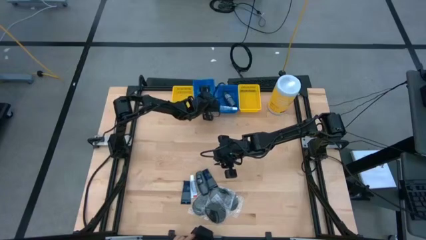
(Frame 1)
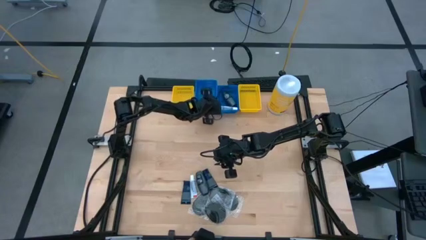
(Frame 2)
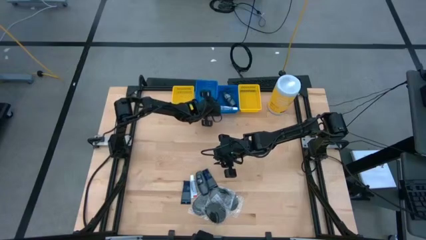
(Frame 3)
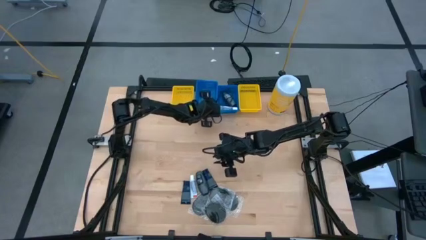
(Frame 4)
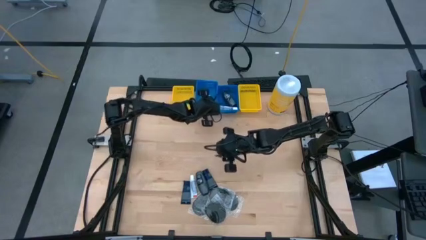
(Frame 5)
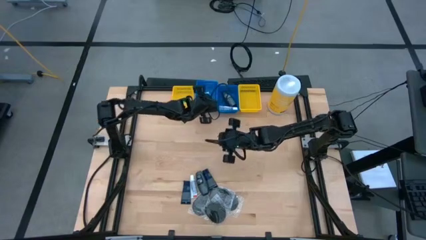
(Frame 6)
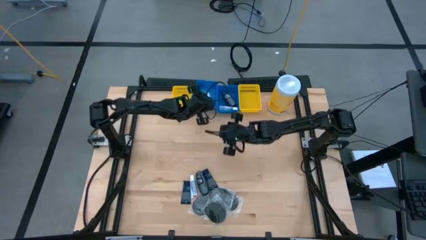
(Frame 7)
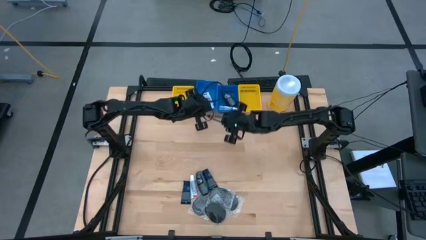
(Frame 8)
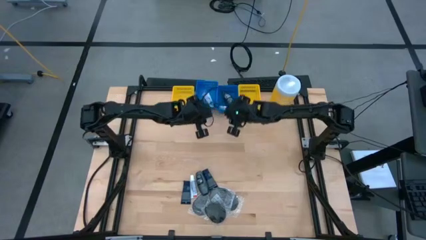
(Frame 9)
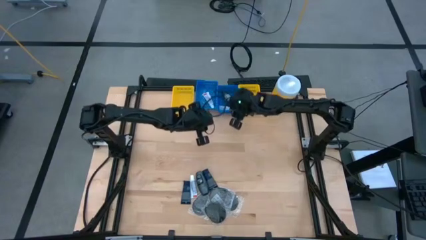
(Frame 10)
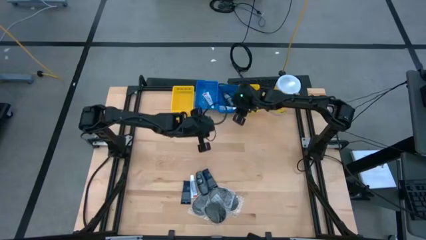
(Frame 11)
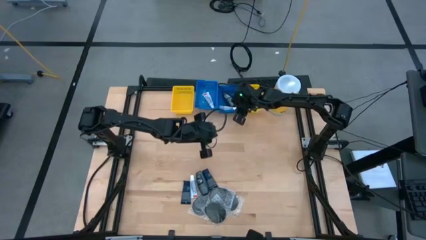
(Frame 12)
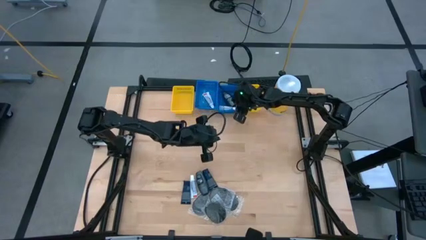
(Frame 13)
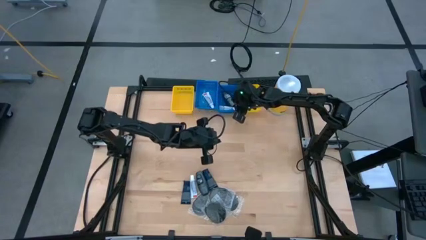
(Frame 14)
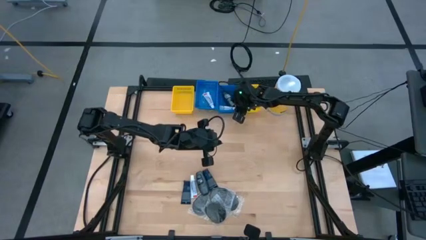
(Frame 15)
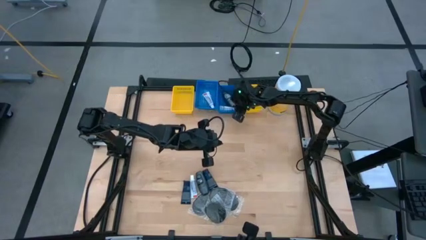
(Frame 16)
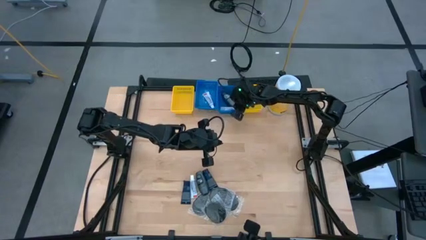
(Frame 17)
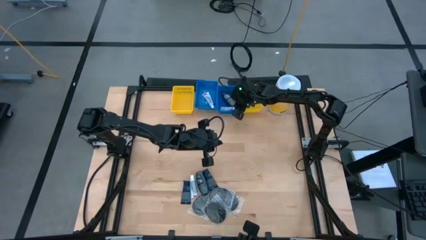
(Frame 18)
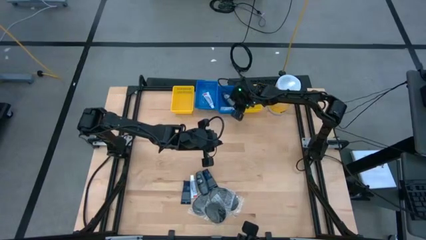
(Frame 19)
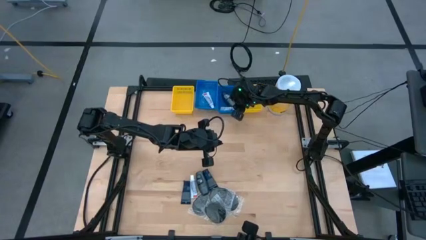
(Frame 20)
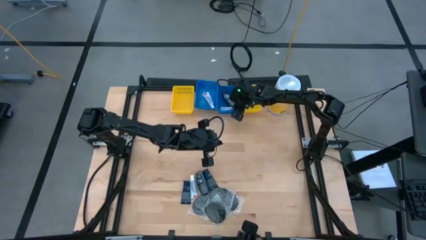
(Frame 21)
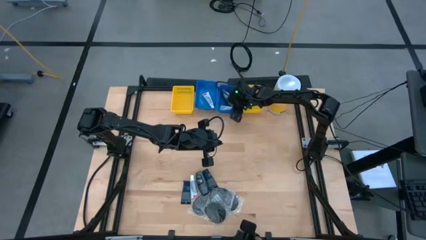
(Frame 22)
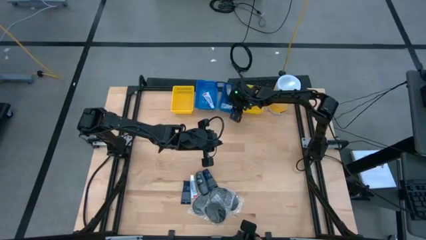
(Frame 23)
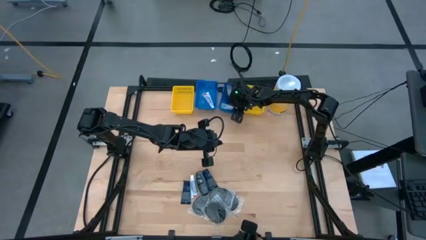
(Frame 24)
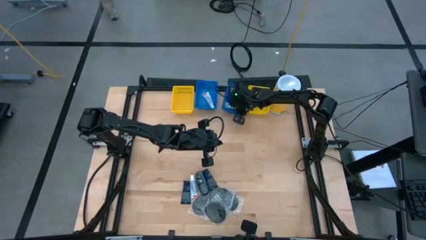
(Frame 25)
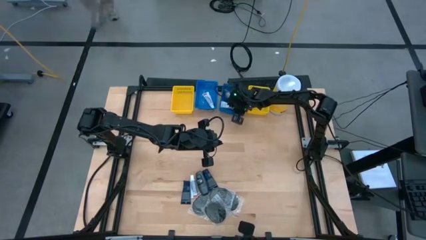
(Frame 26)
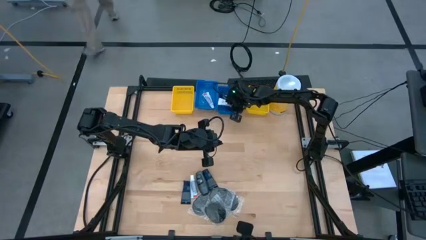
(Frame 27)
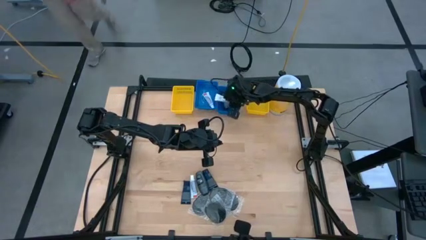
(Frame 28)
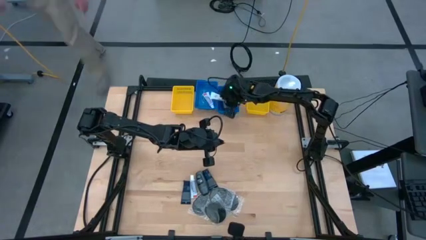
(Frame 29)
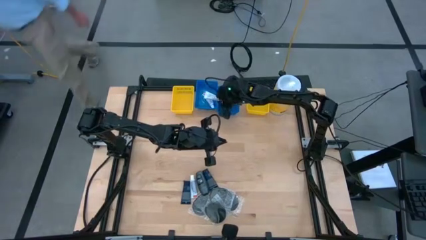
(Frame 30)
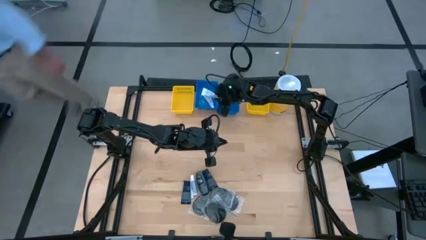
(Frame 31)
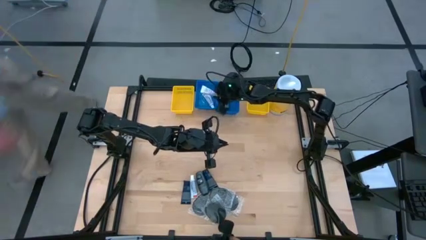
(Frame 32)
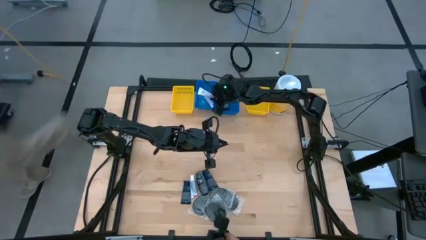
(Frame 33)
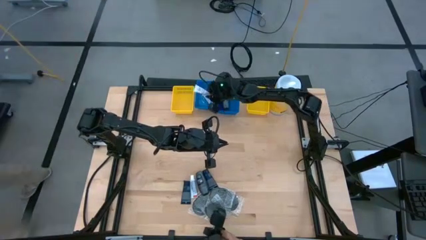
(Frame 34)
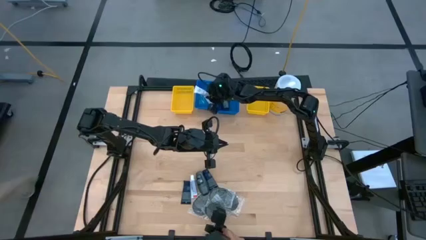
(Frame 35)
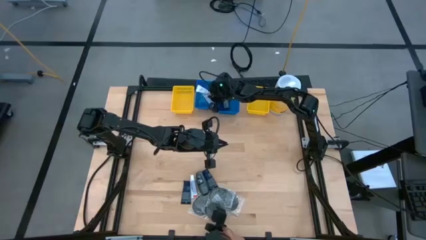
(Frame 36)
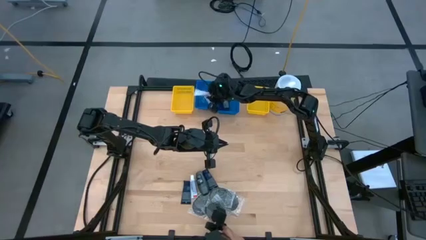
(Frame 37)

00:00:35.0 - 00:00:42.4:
Task: Pick & Place Travel size toiletries
Put the white toothpaste into the left blue bin

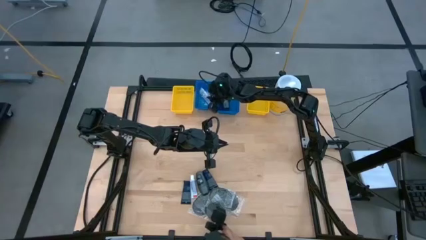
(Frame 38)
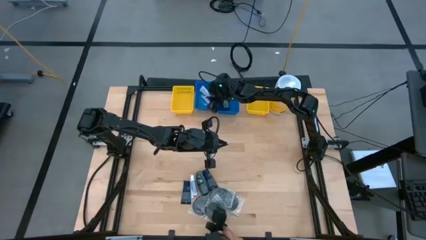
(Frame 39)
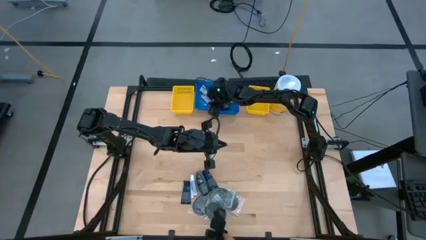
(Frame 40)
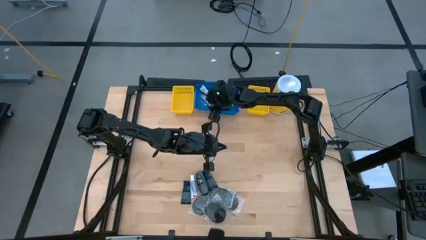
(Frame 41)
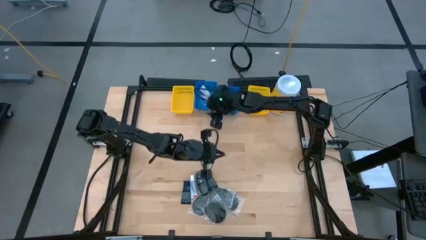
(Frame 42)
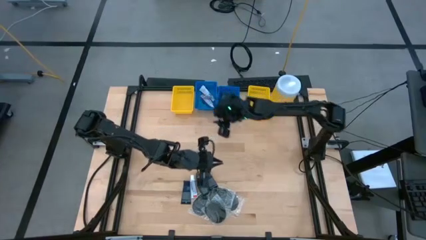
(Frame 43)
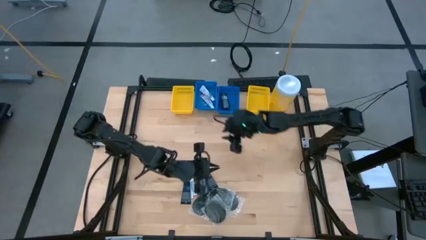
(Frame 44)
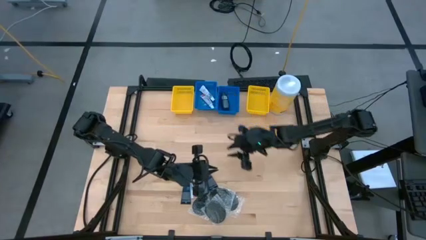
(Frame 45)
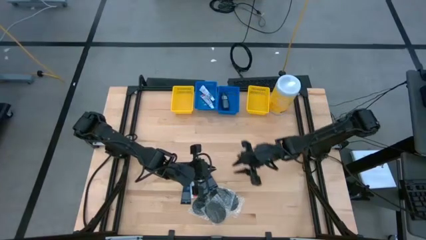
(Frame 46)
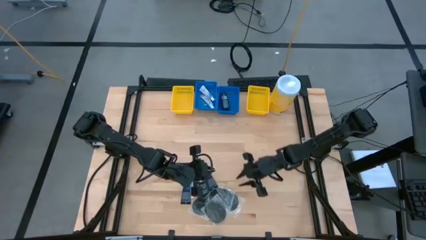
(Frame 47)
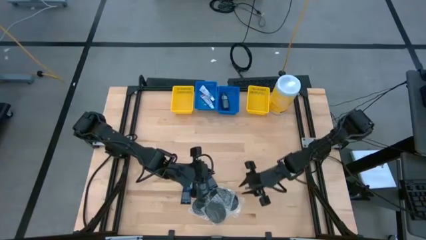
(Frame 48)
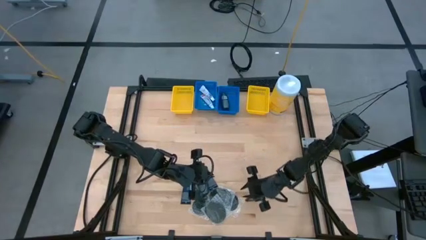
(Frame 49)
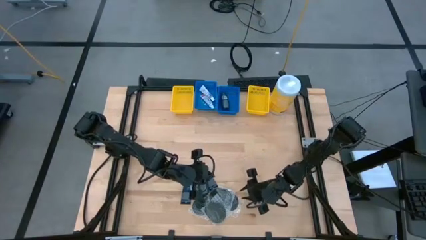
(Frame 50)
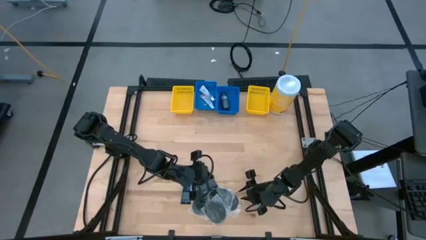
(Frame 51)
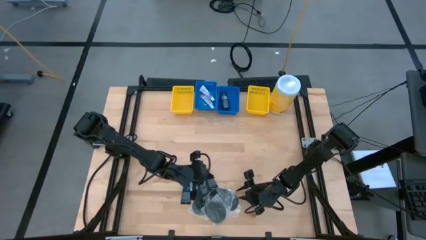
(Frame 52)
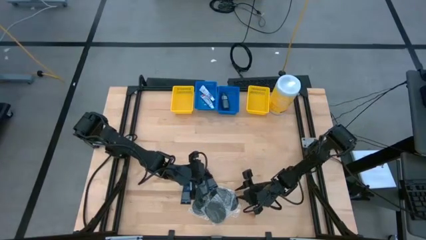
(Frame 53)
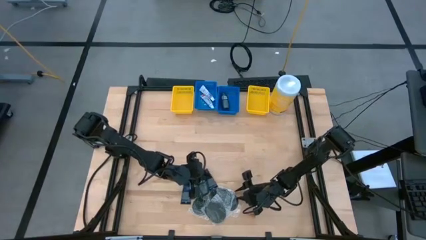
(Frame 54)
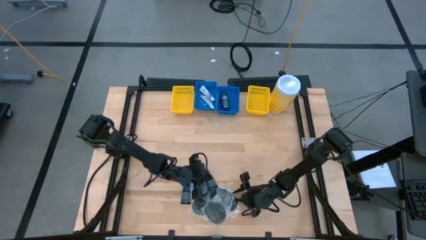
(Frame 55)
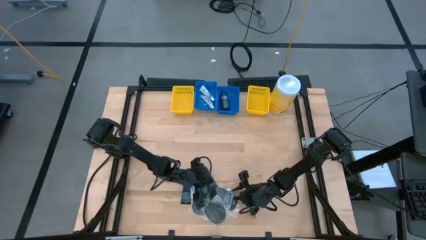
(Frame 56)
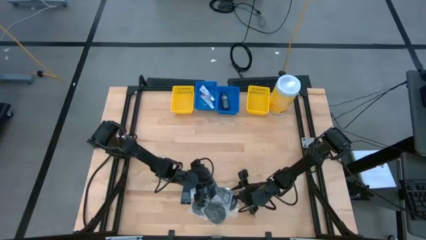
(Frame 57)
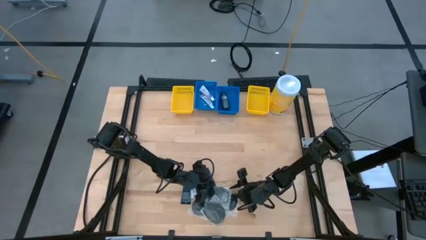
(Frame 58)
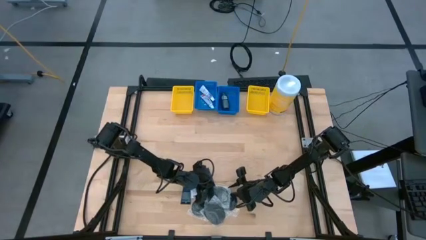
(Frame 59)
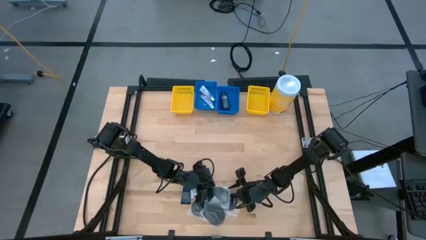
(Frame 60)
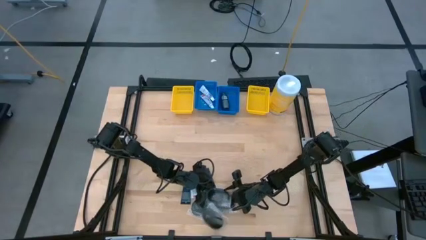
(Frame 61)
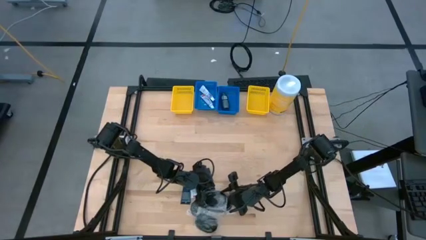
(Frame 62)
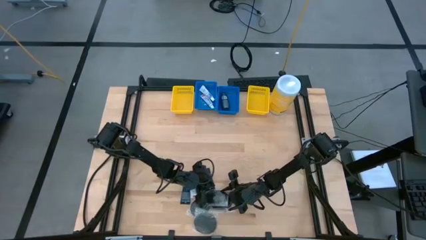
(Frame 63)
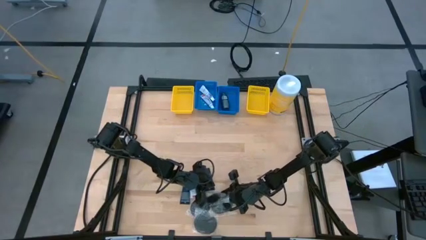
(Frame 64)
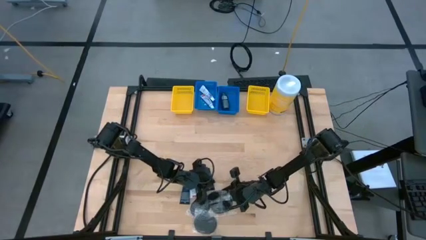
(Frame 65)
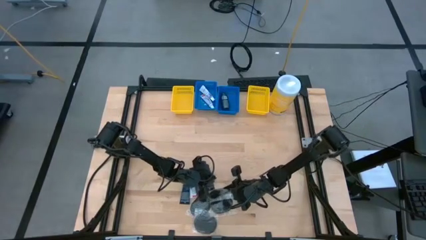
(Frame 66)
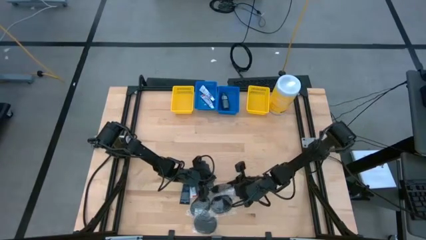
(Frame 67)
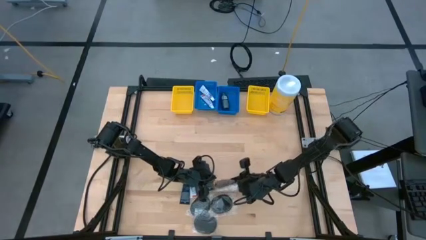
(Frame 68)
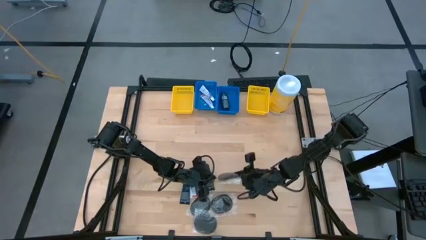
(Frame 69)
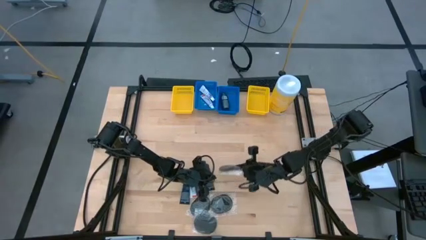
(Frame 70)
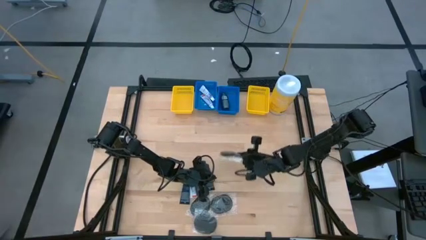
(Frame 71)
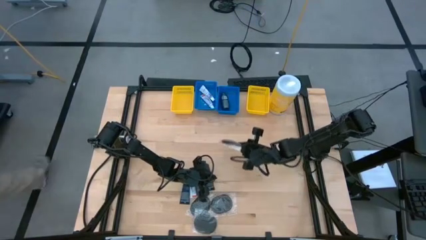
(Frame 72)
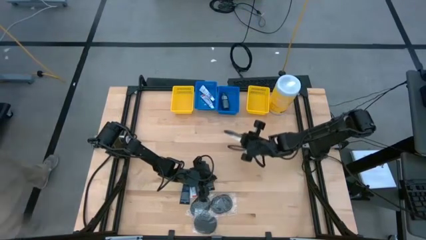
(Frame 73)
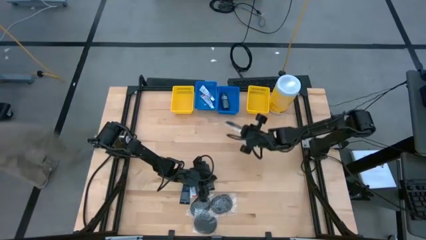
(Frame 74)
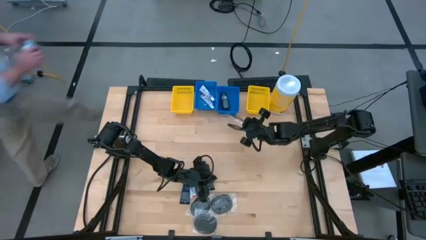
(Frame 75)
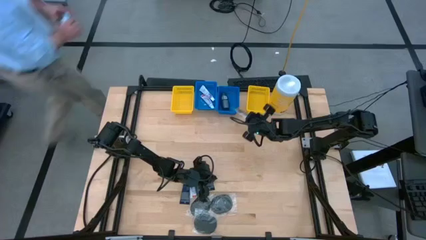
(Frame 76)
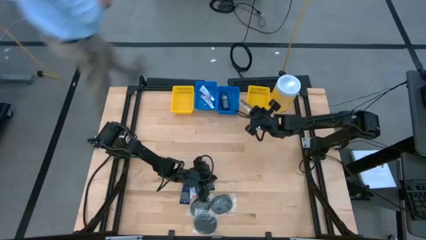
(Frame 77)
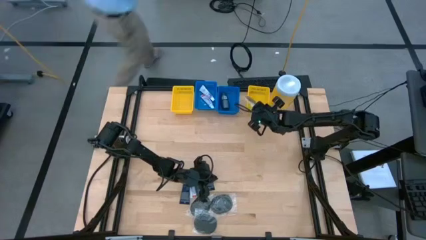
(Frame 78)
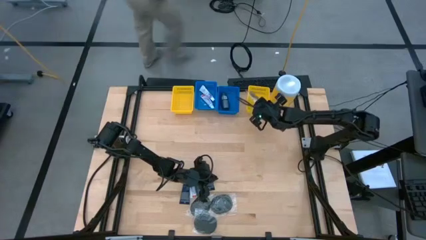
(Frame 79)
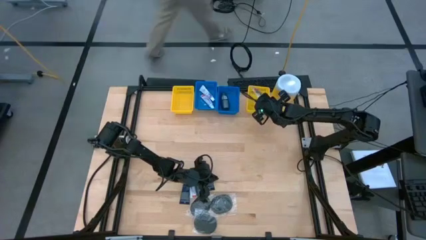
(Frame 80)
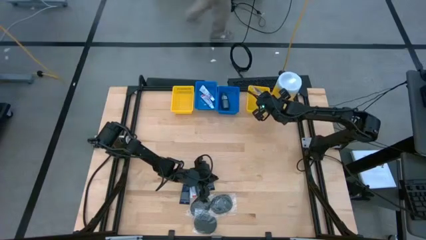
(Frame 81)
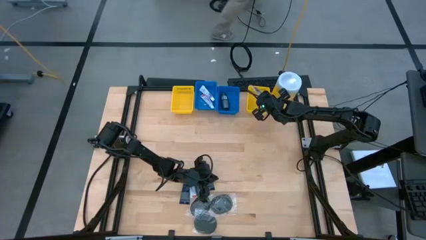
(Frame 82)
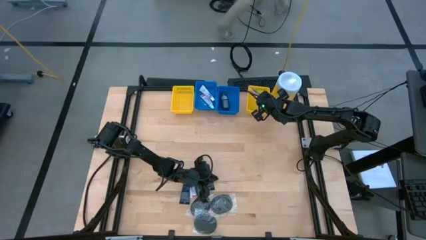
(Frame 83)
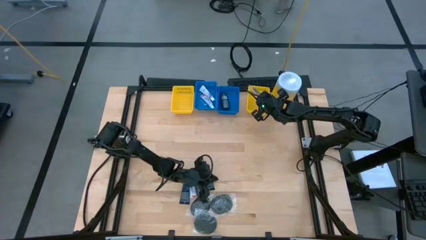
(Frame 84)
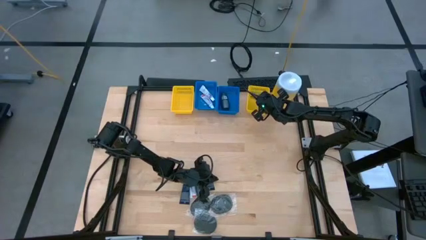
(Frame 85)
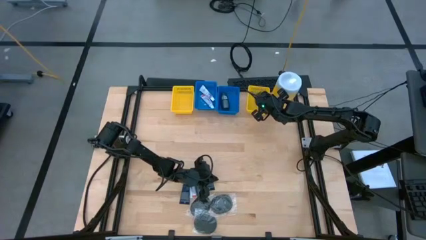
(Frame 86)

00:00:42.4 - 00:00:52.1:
Put the black hairbrush into the right yellow bin
